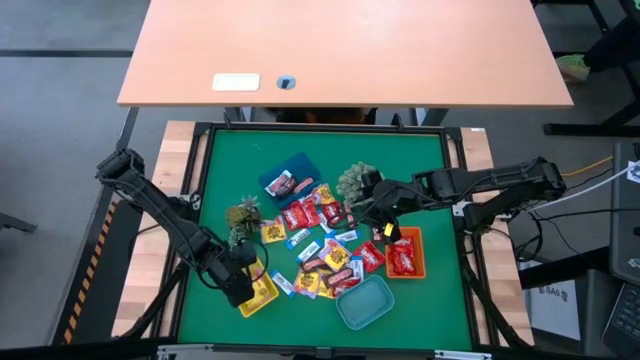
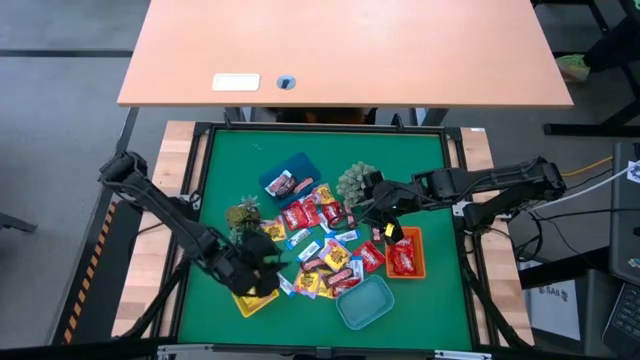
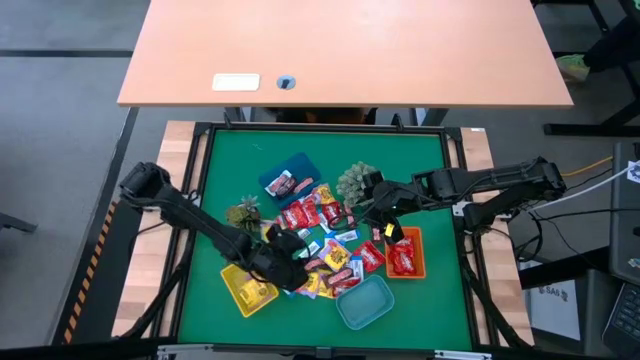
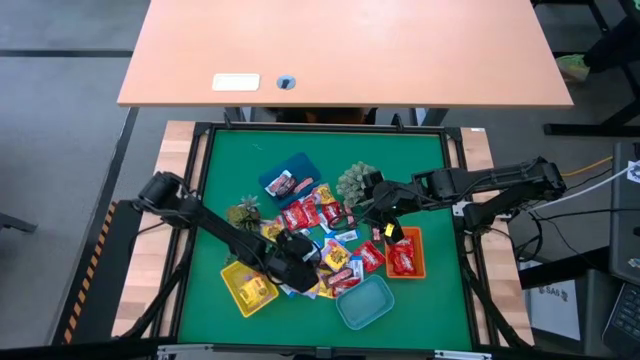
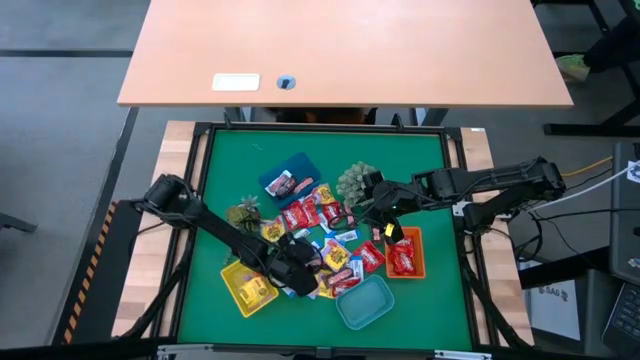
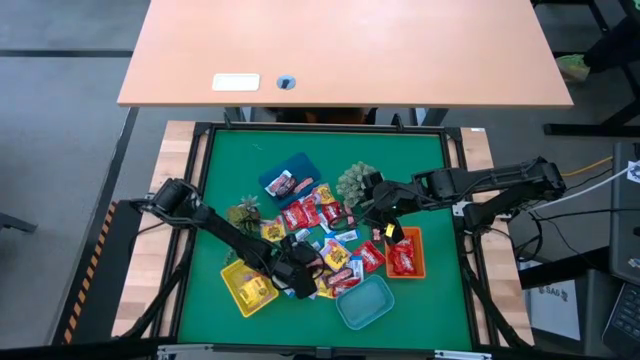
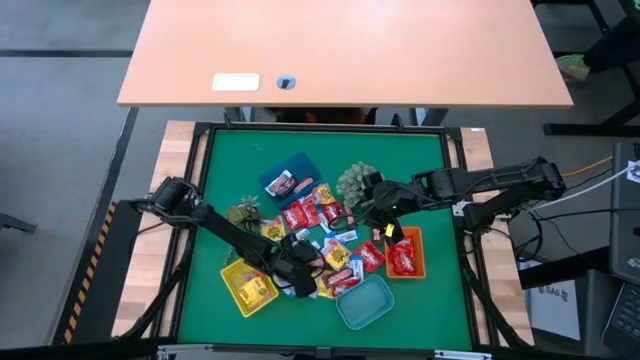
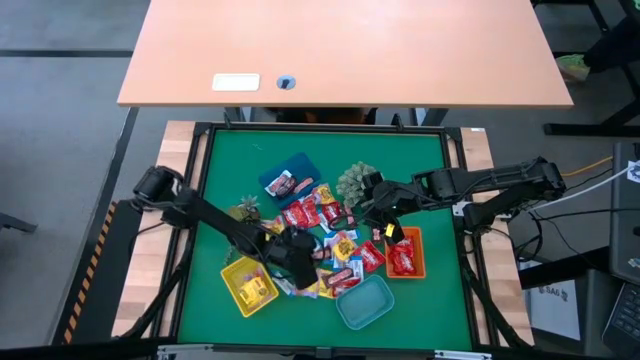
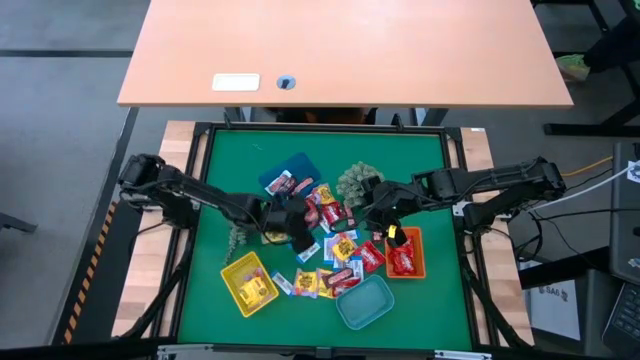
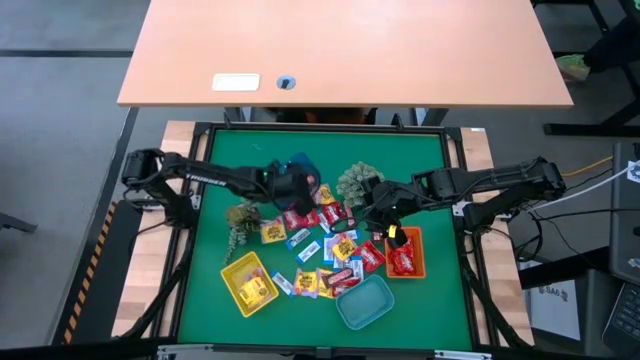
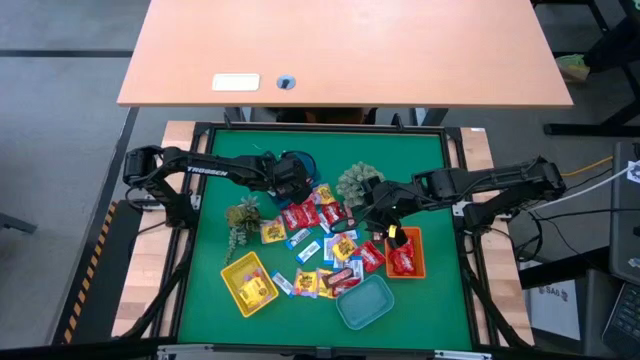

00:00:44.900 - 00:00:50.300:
Task: Sort candy
Put the brown chocolate into the blue bin

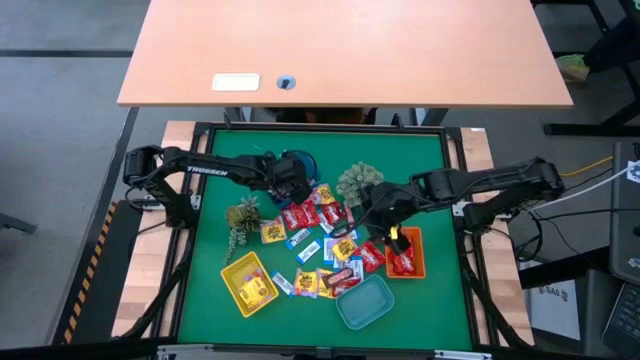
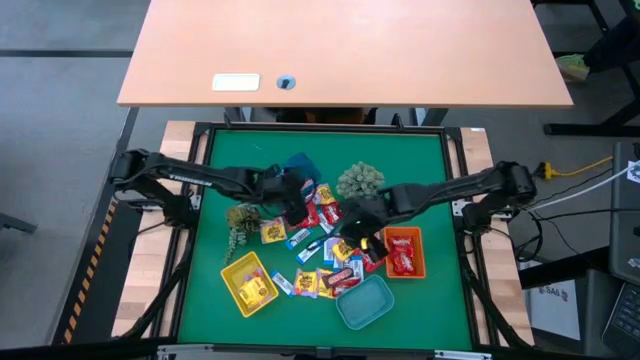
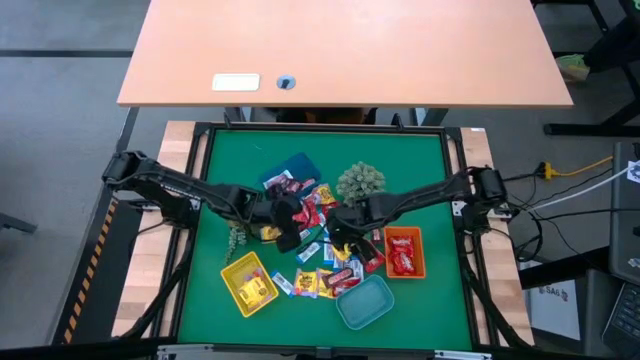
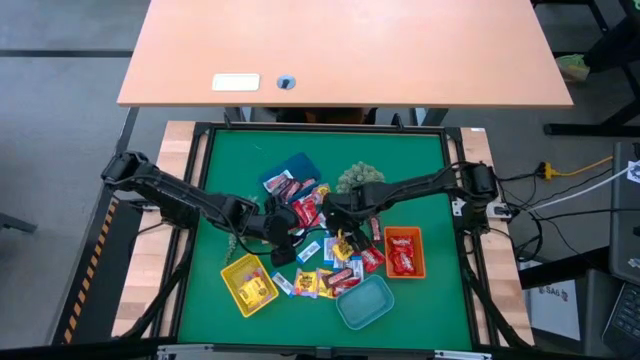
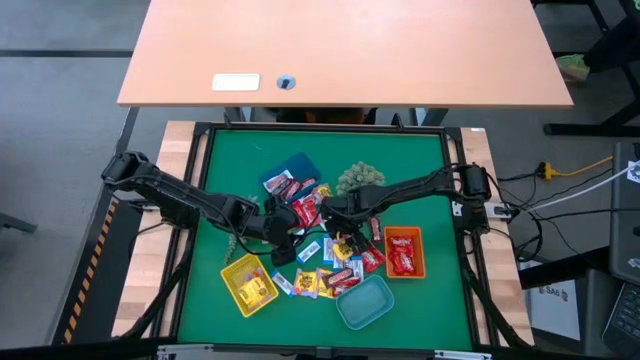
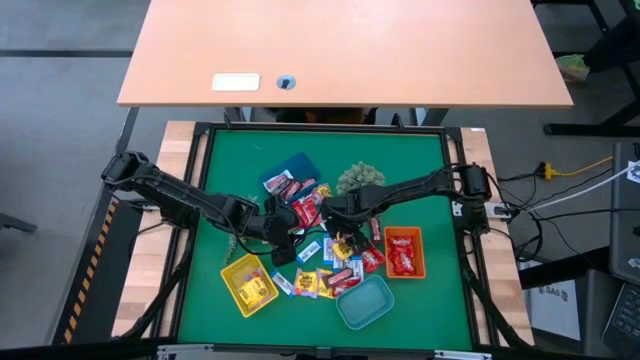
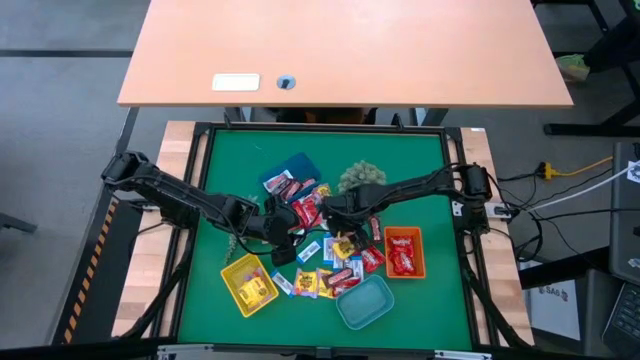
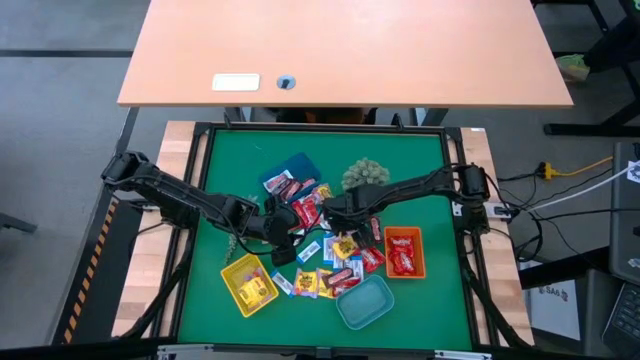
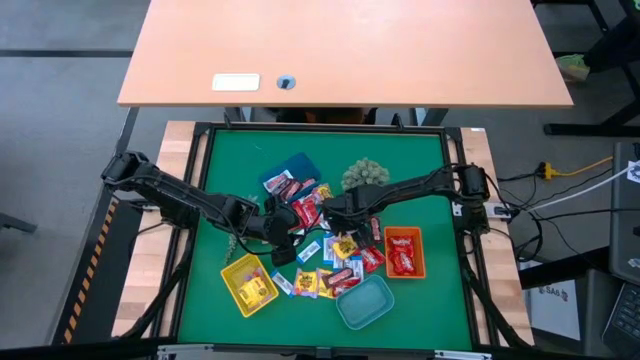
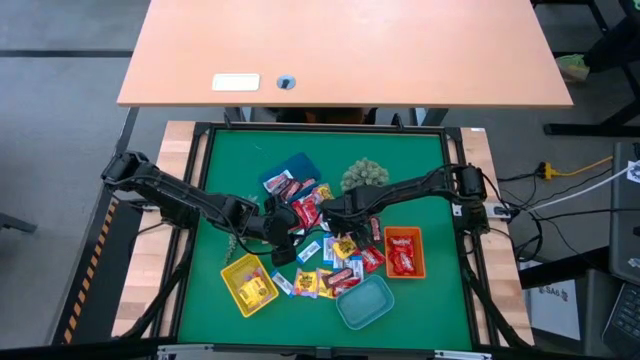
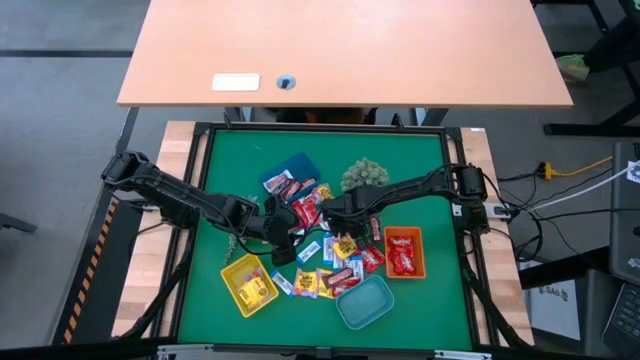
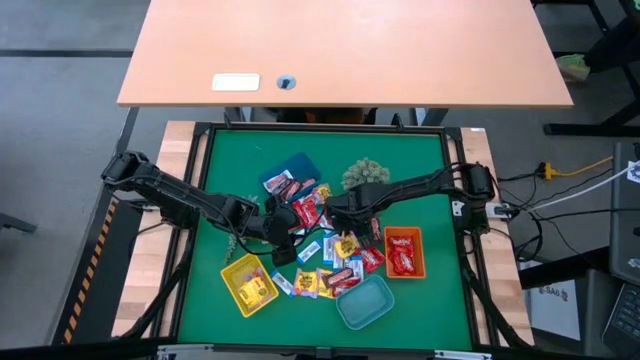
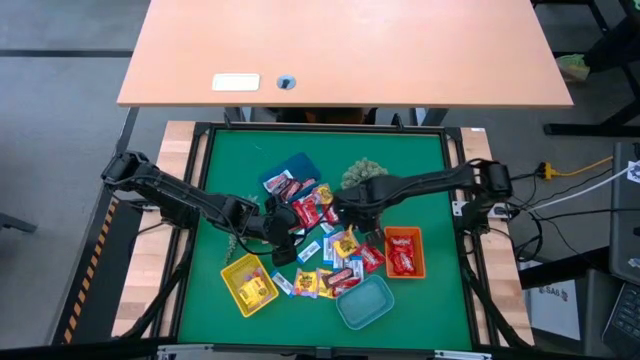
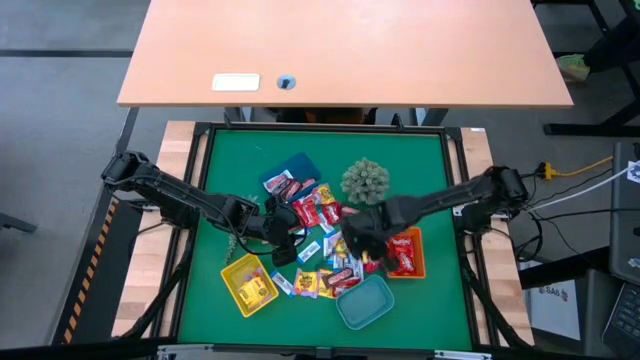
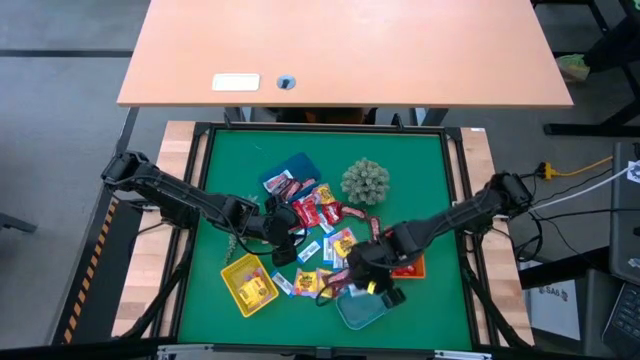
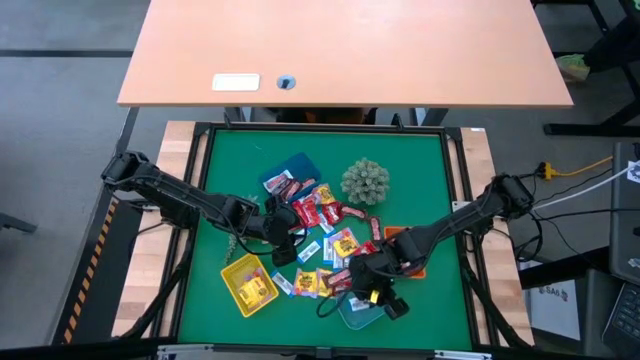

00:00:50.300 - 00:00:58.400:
Put the white-blue chocolate into the light blue bin

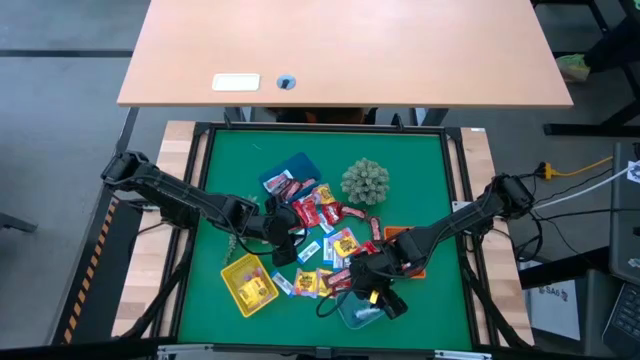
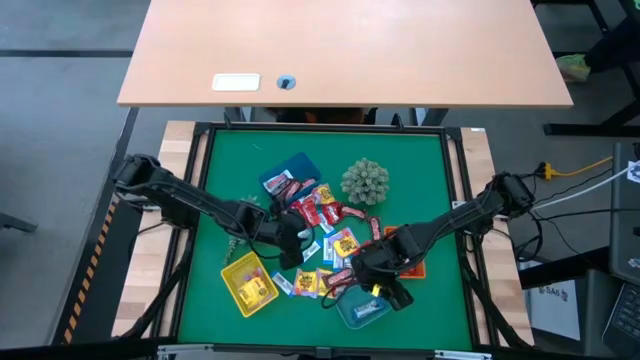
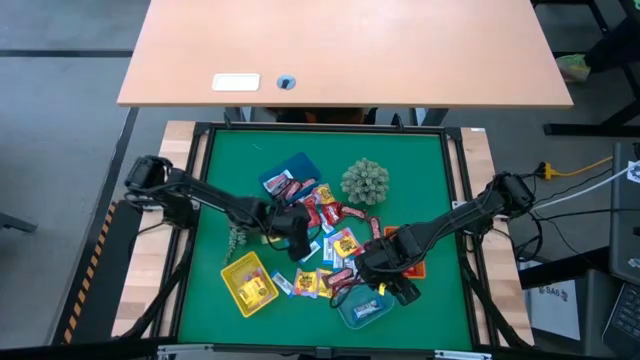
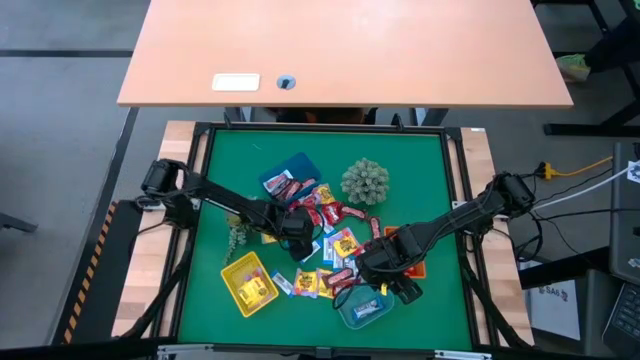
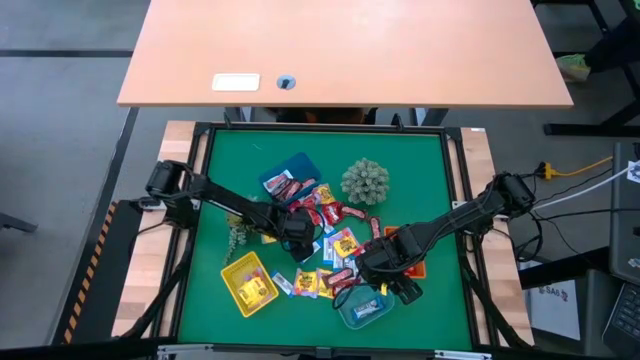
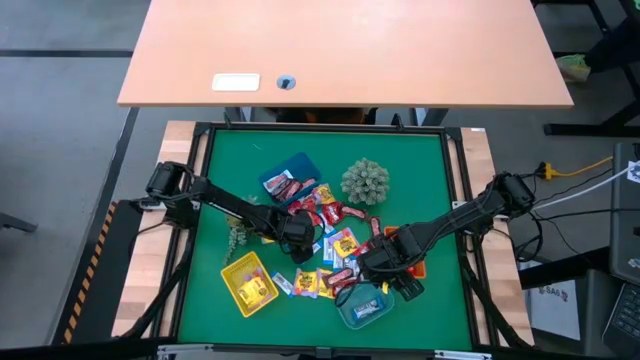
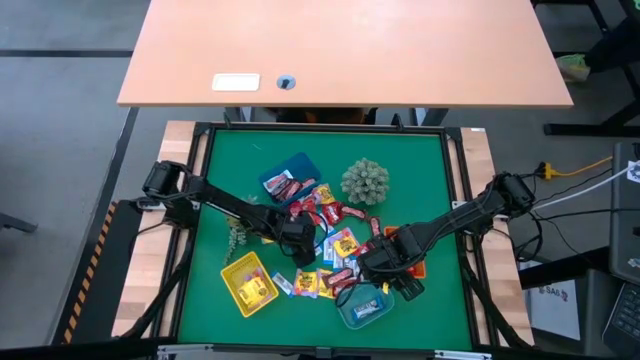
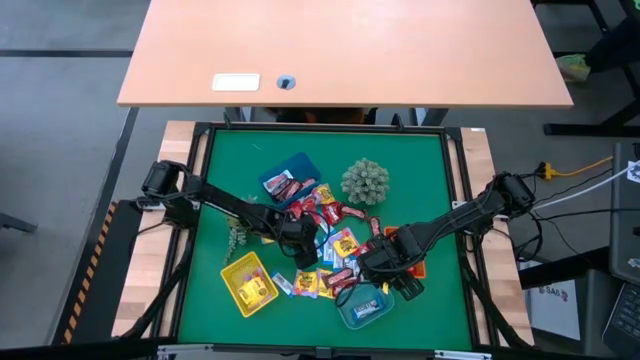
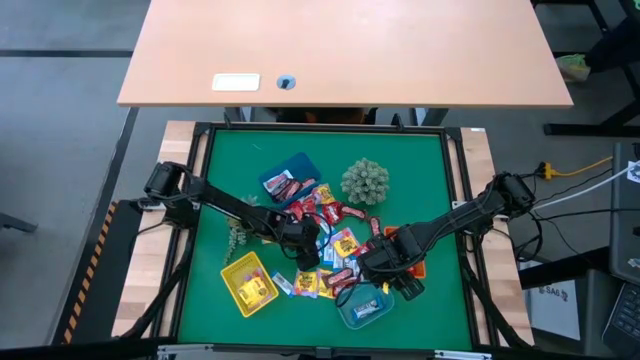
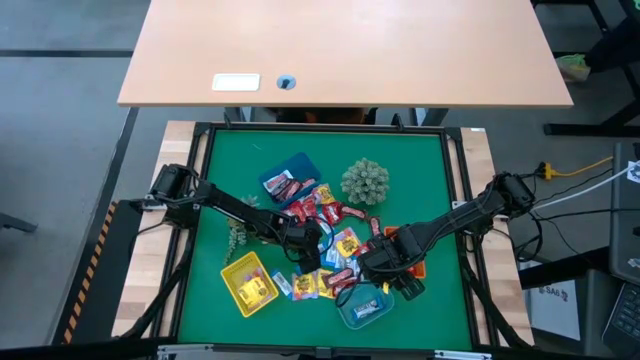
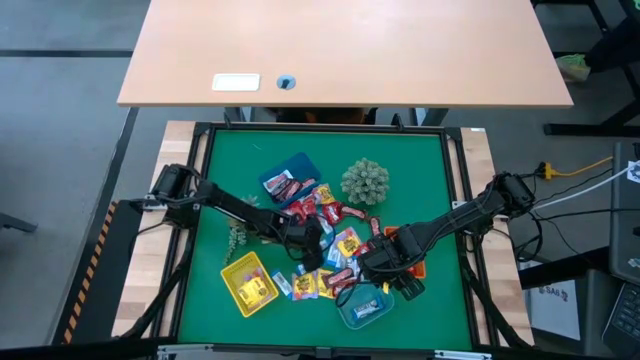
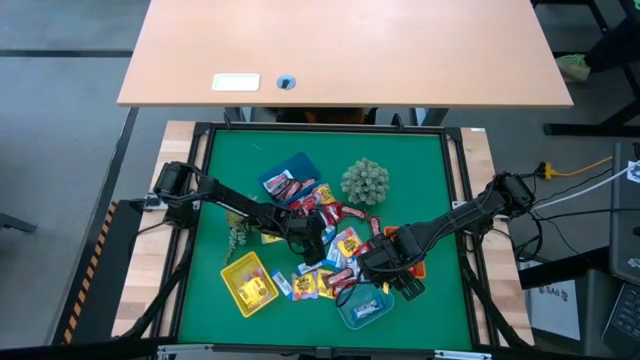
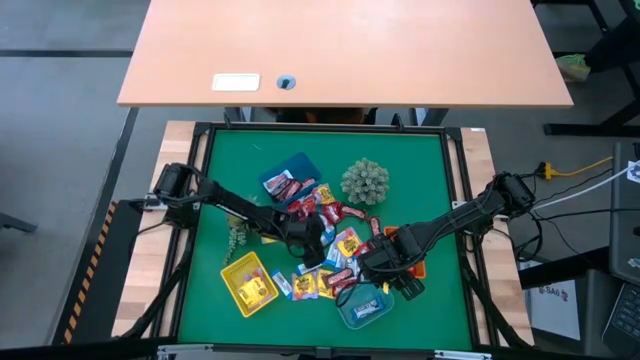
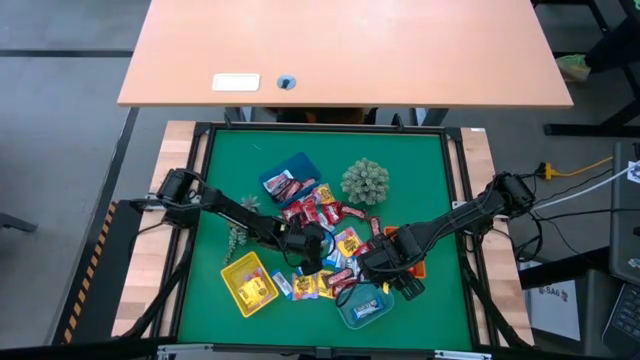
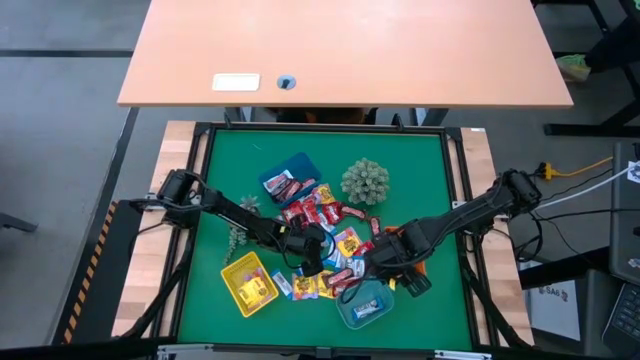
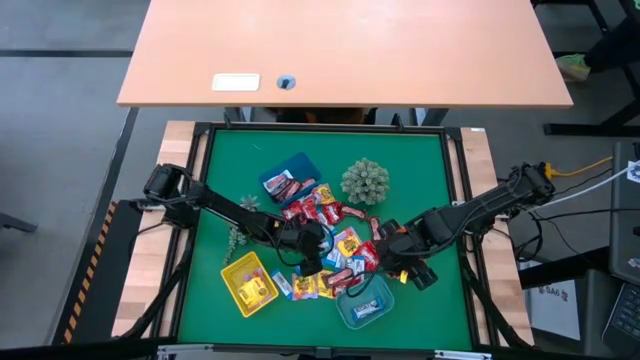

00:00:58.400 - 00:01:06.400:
Put the white-blue chocolate into the light blue bin

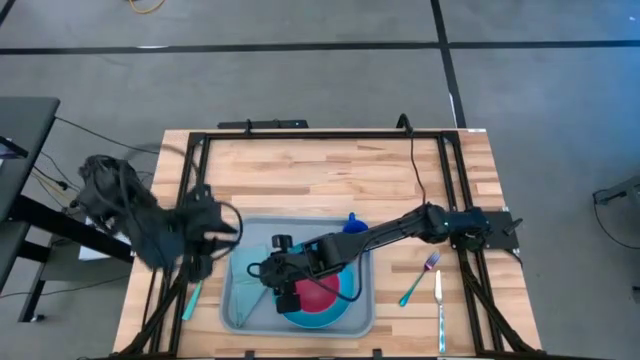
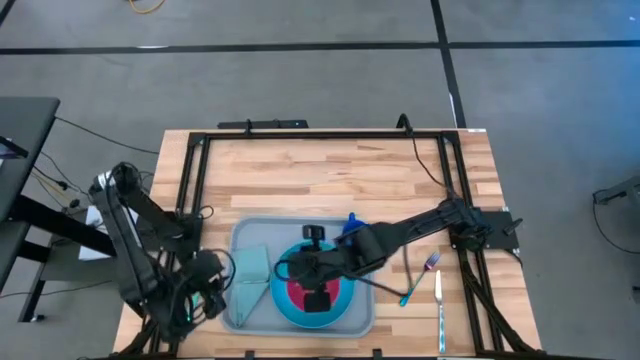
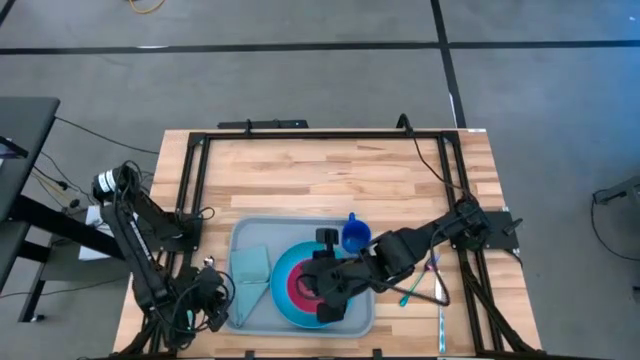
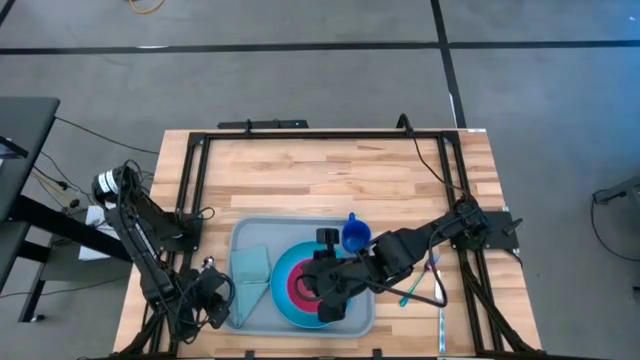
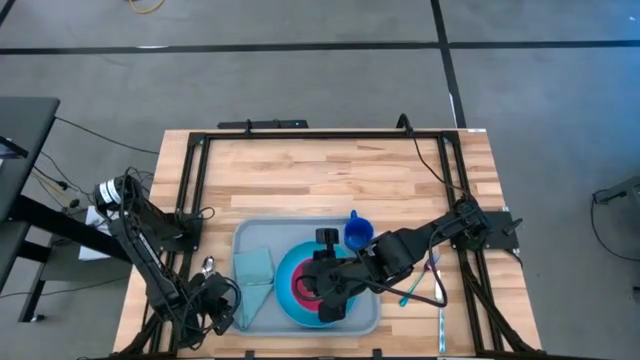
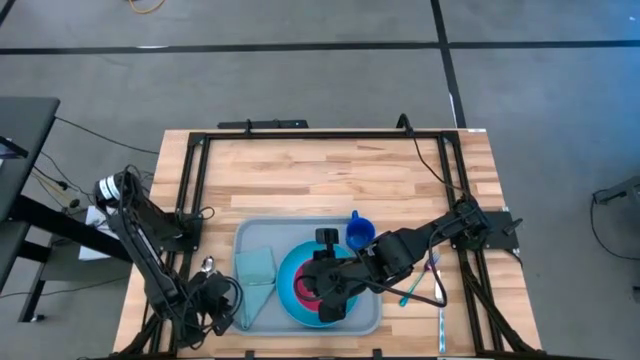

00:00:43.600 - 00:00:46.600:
Task: Set up tray
Adjust the gray tray
